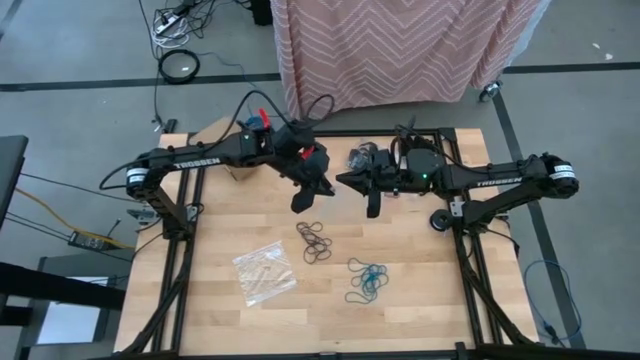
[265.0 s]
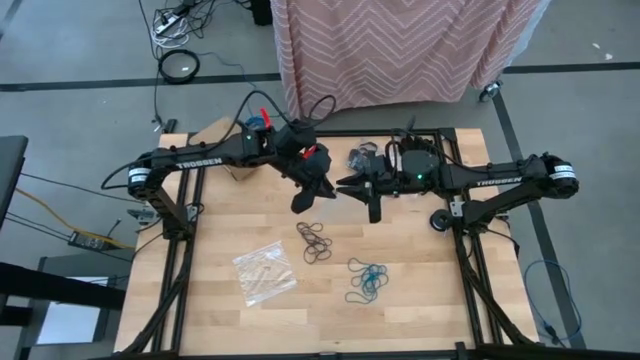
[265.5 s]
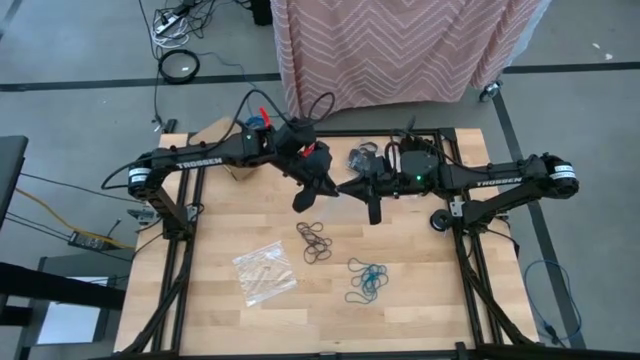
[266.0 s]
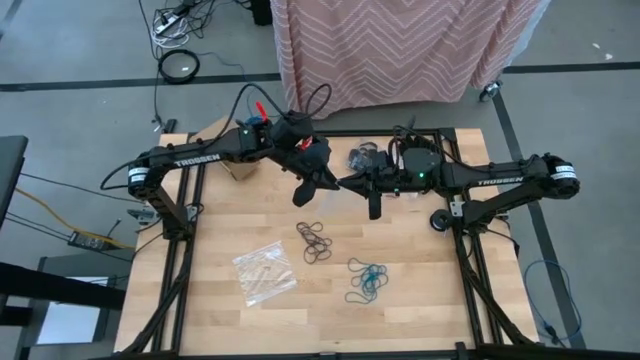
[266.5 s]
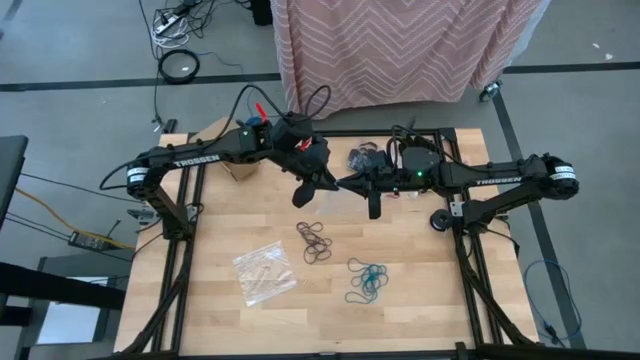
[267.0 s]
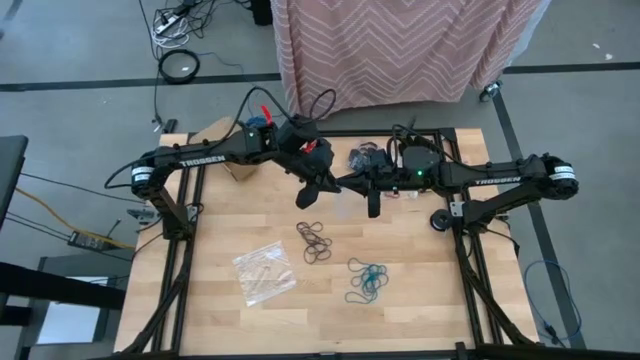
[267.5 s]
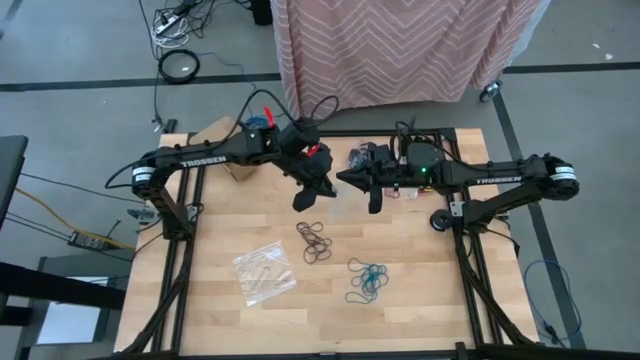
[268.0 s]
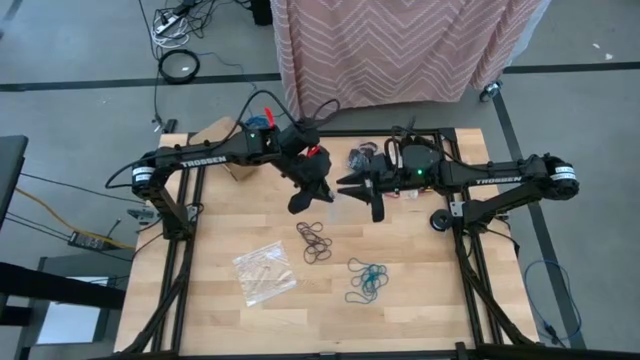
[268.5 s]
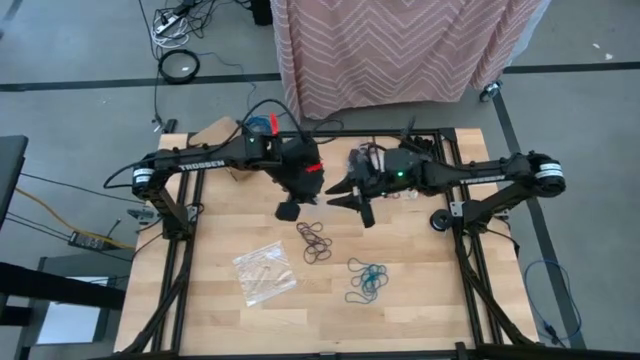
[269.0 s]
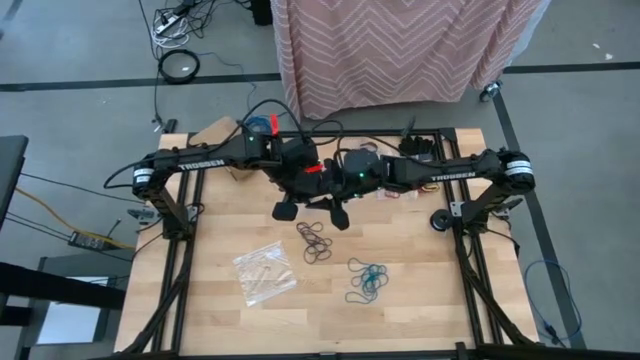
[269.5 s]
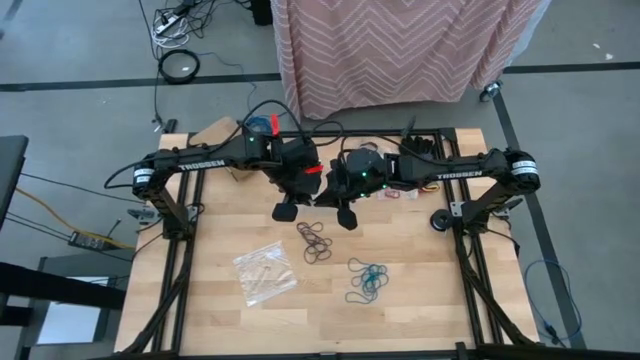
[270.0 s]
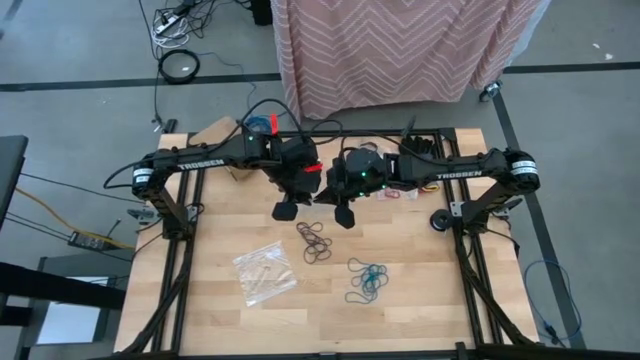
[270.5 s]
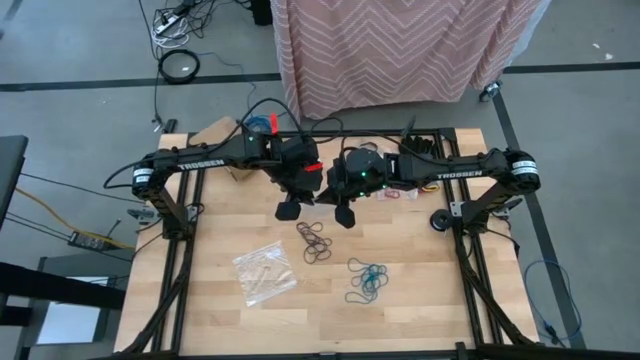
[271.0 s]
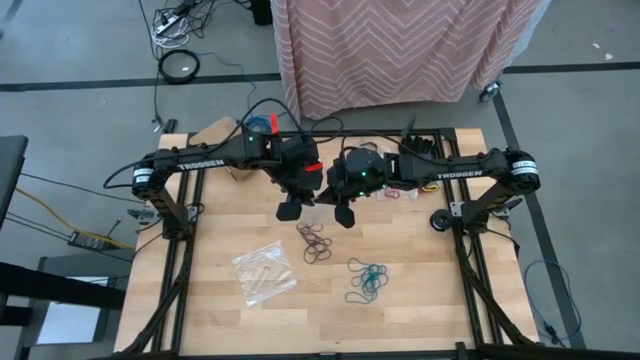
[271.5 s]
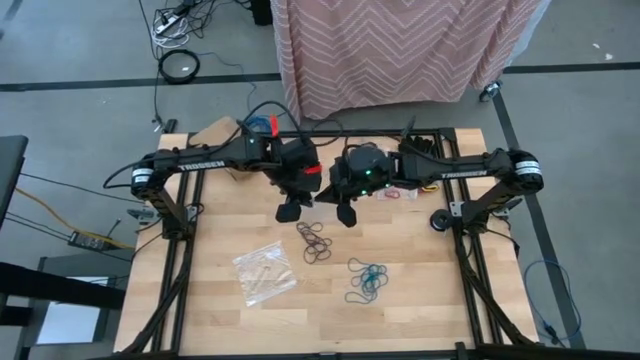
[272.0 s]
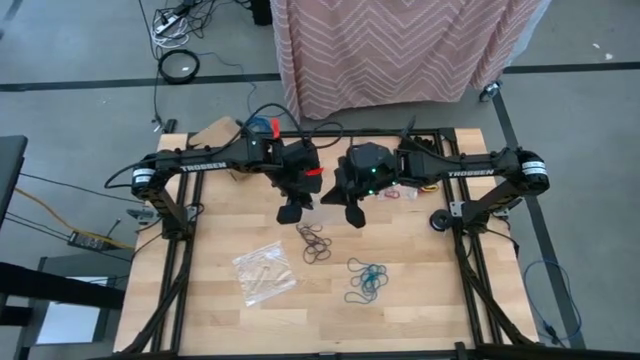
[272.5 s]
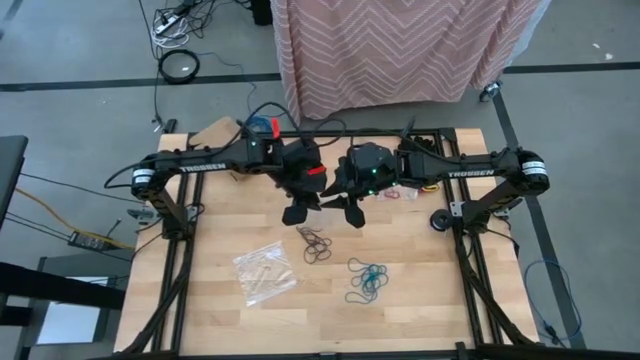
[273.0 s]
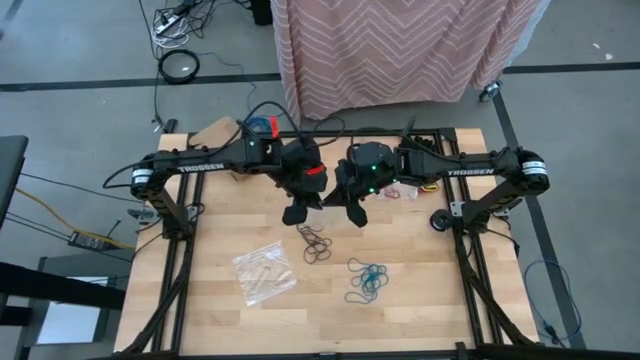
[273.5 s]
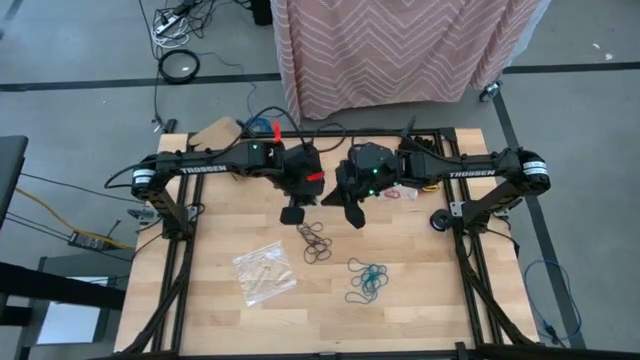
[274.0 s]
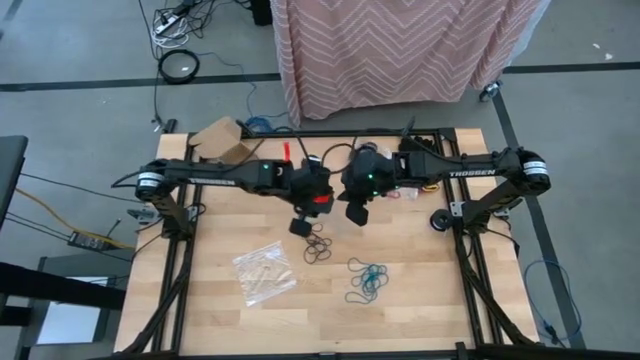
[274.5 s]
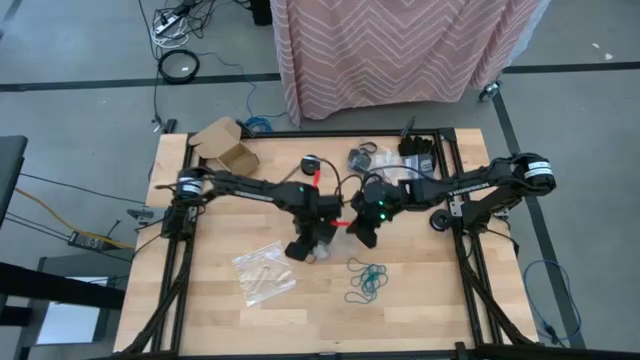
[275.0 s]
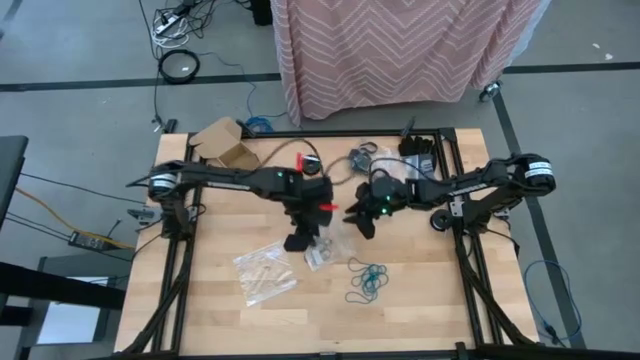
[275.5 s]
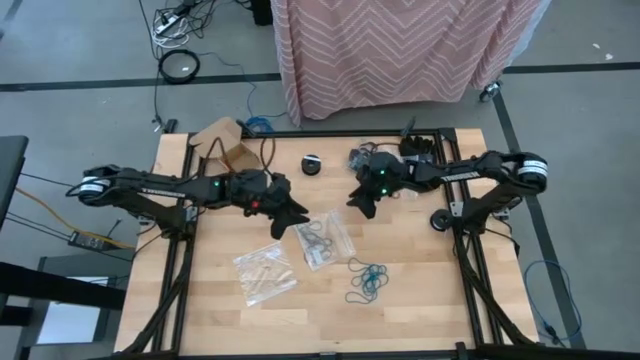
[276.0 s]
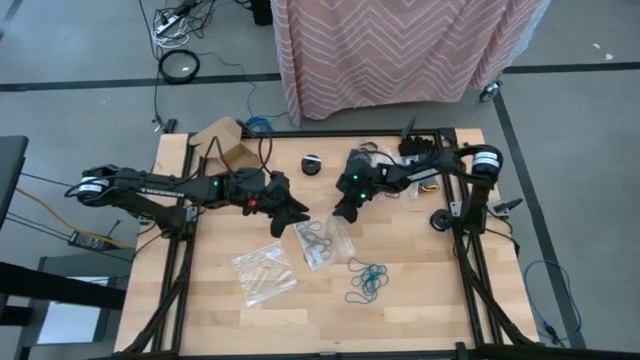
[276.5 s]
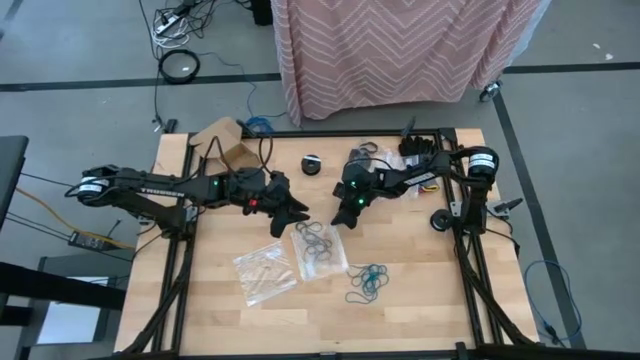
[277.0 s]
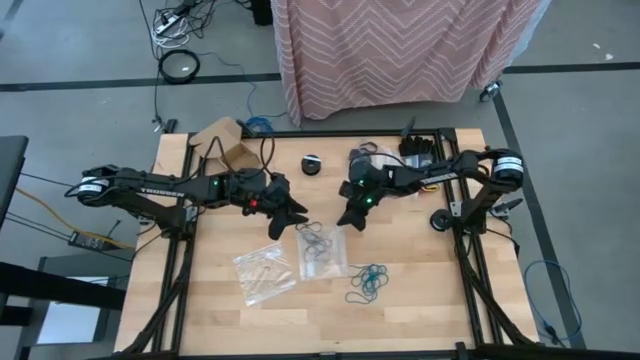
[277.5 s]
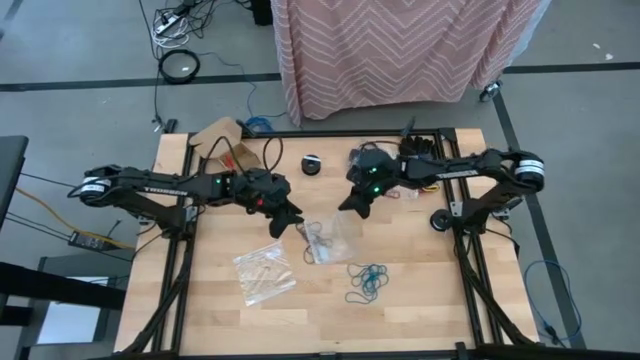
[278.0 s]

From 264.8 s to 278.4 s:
Task: Sort rubber bands
Open the transparent zip bag

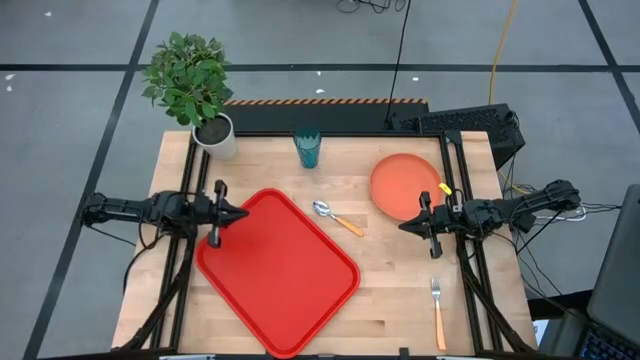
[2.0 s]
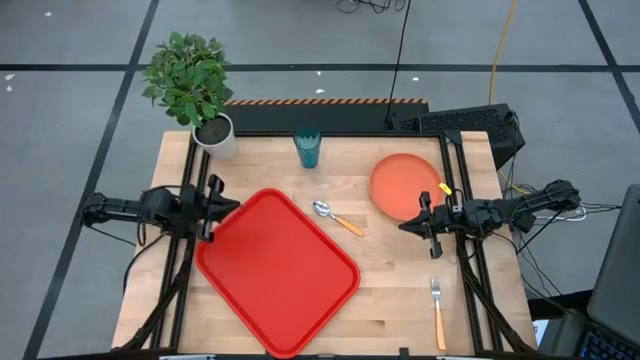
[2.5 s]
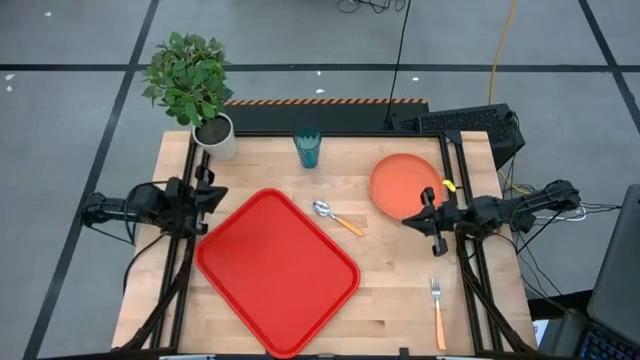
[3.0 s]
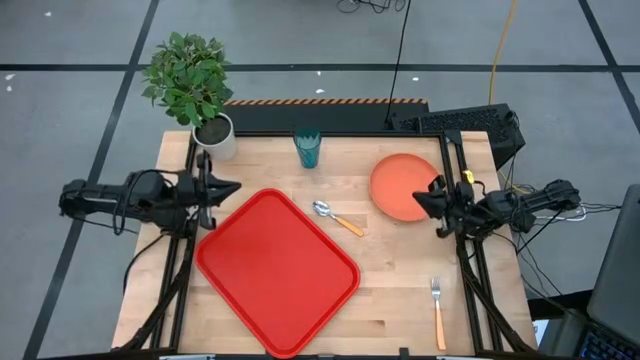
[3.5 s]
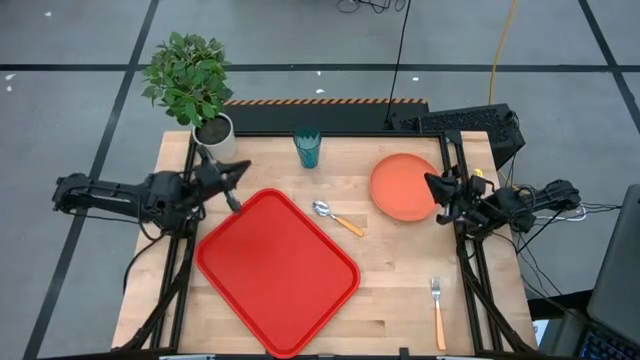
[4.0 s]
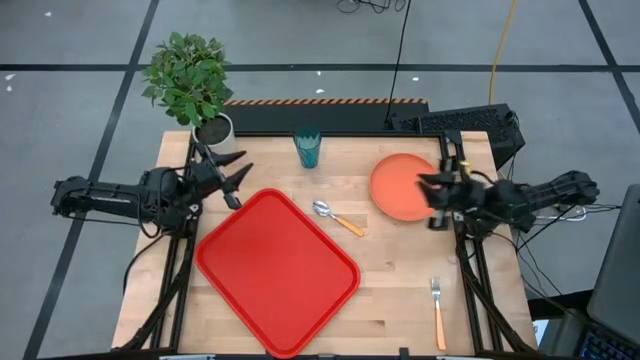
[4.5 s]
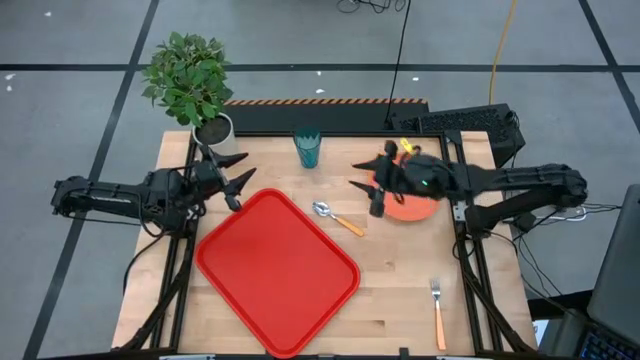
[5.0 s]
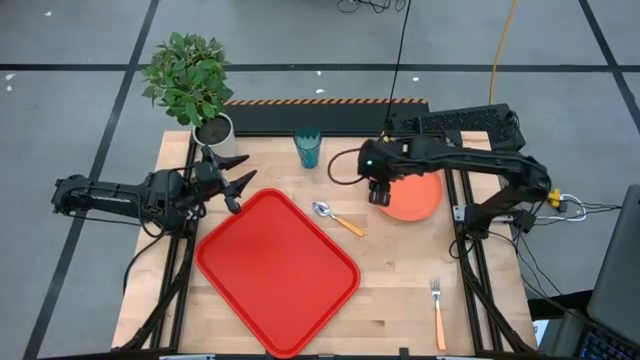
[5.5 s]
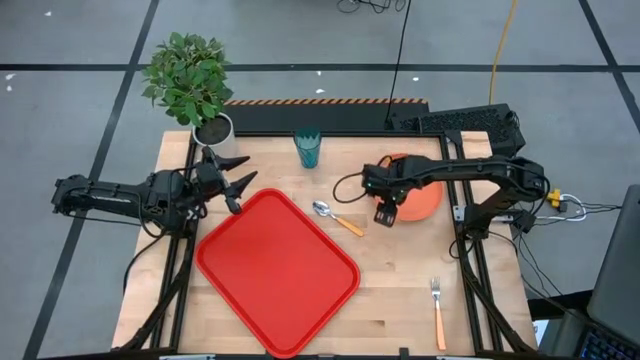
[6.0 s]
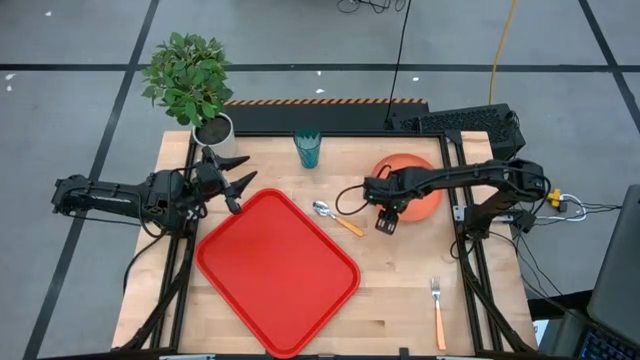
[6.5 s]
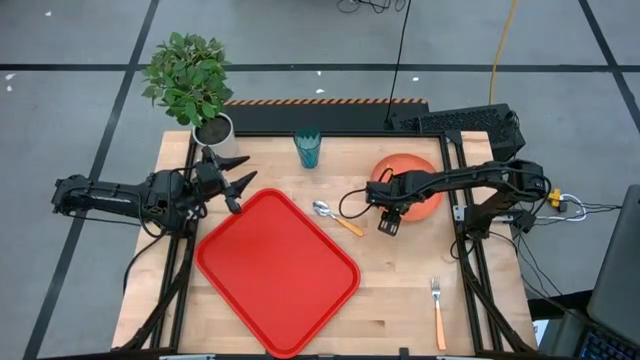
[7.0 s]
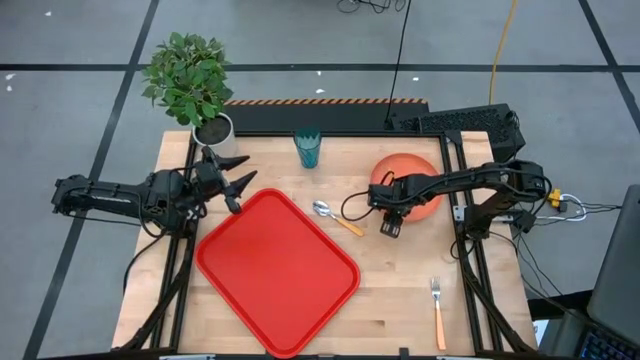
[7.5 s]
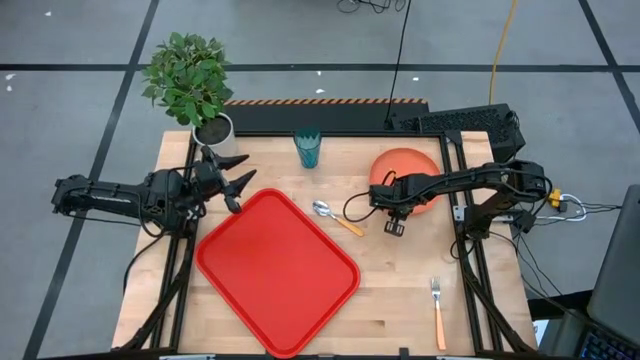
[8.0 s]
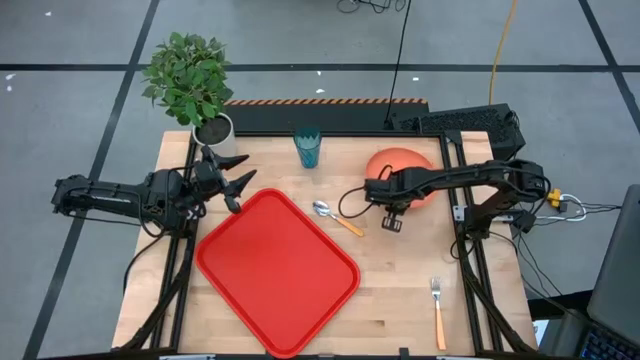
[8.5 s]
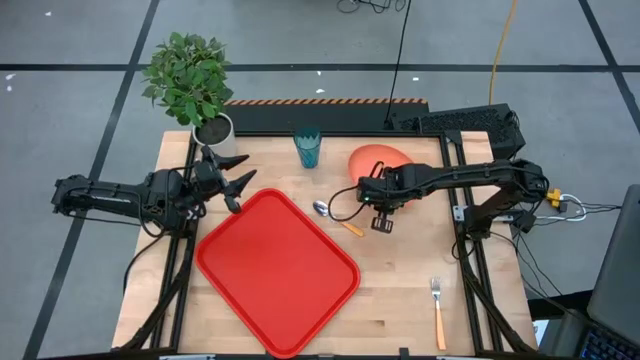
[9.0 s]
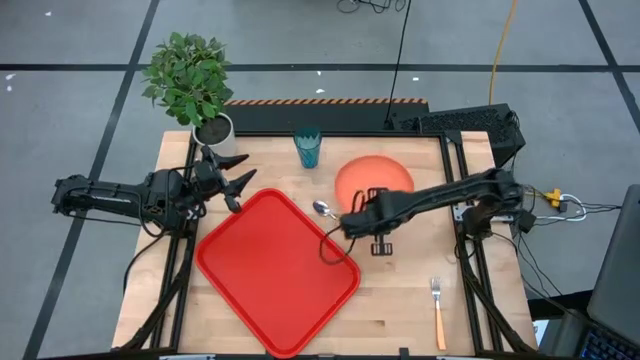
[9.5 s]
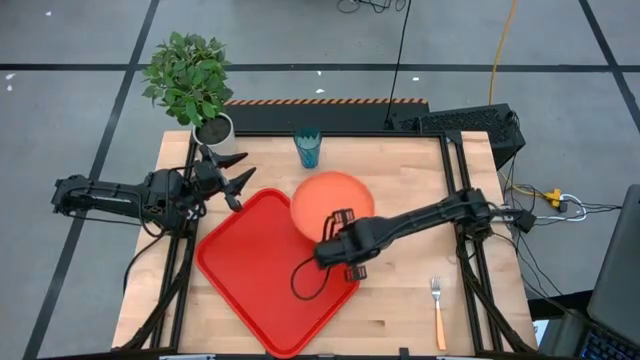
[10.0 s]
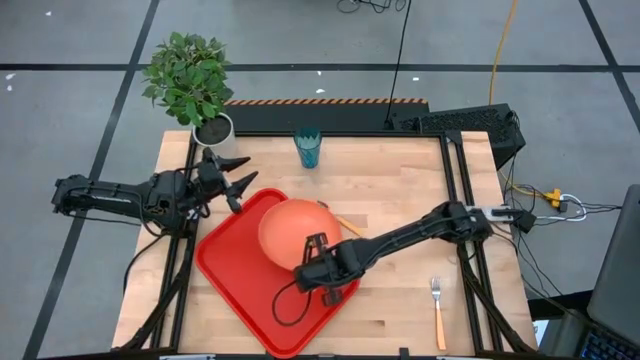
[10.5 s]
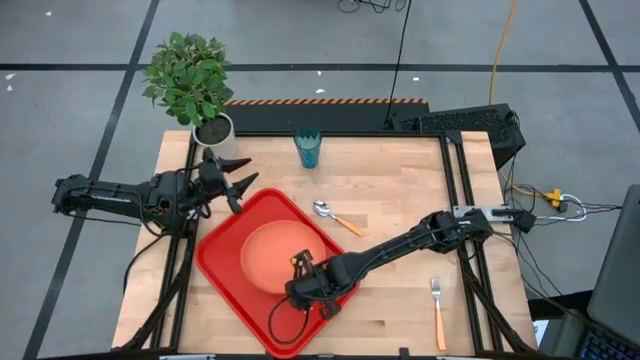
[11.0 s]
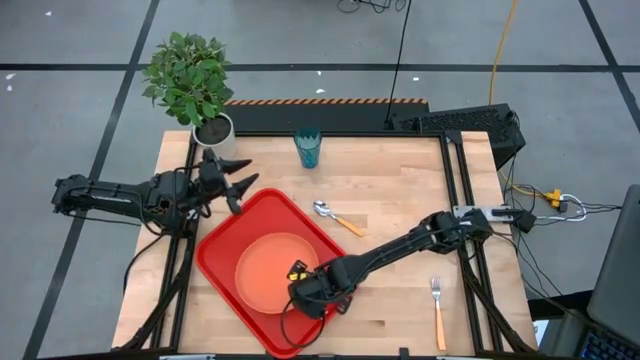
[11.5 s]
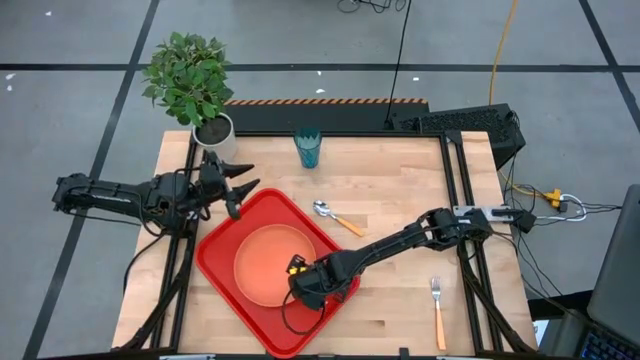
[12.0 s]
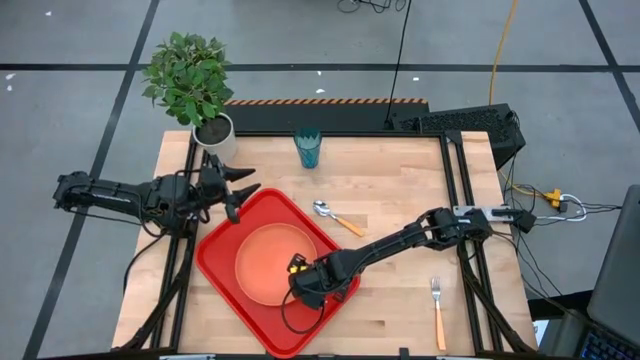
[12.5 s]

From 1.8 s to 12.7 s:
Task: Pick and place plate/cup/fork/spoon on tray
Put the orange plate on the red tray
